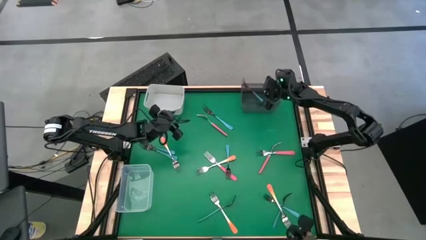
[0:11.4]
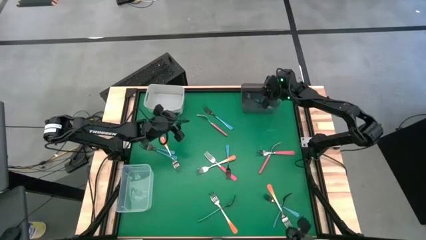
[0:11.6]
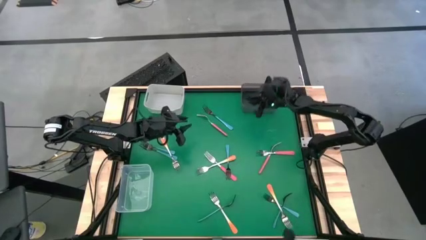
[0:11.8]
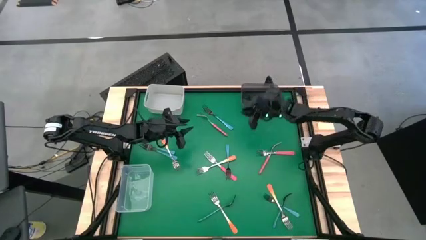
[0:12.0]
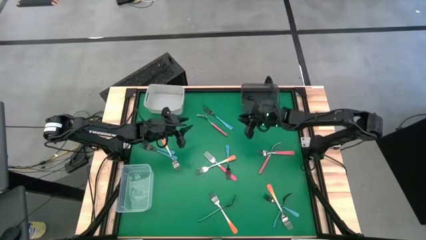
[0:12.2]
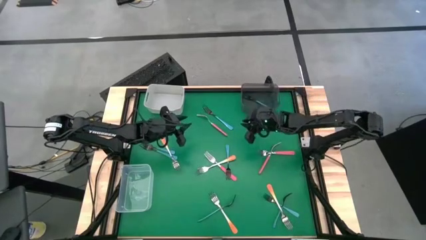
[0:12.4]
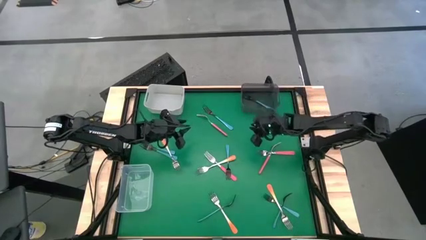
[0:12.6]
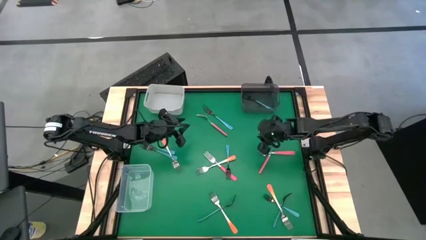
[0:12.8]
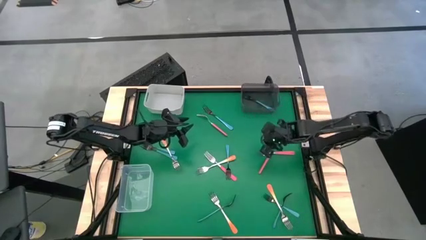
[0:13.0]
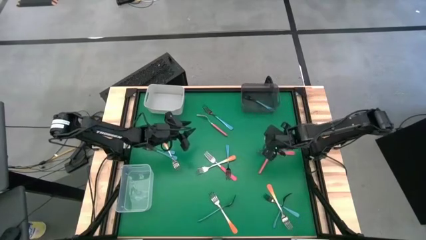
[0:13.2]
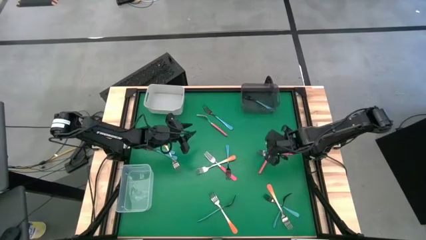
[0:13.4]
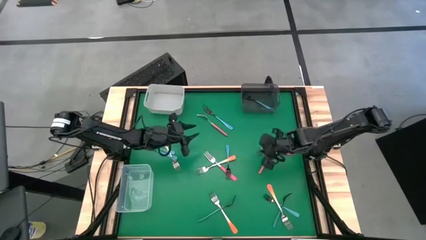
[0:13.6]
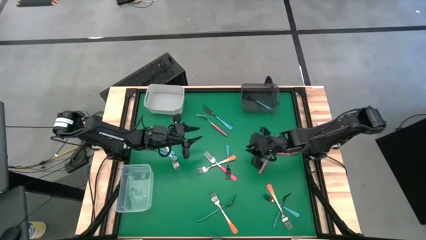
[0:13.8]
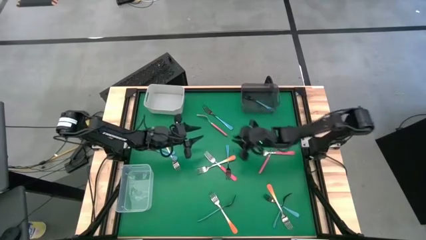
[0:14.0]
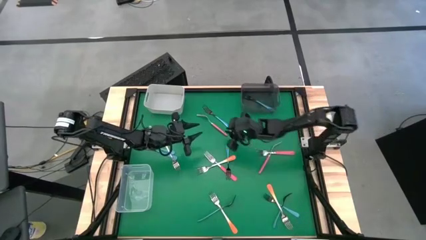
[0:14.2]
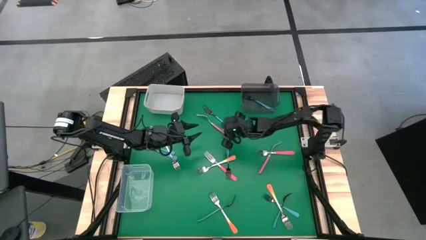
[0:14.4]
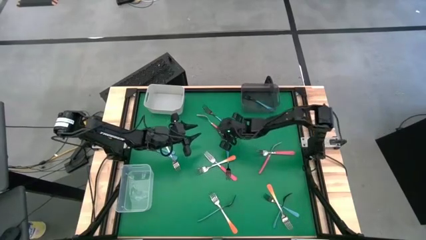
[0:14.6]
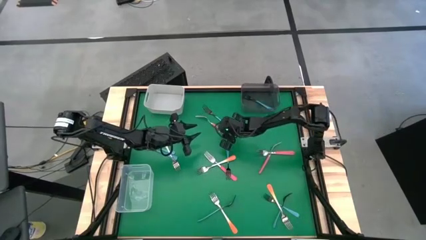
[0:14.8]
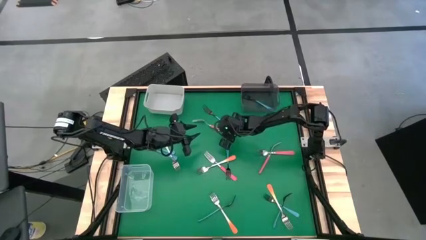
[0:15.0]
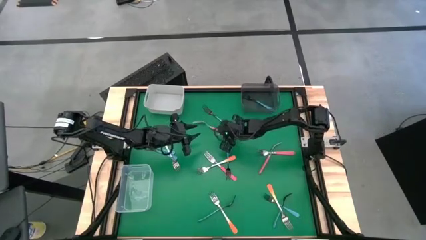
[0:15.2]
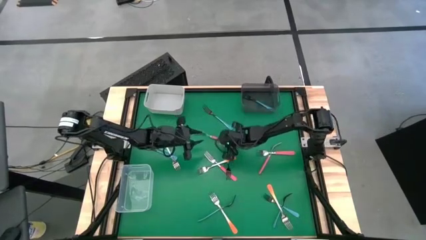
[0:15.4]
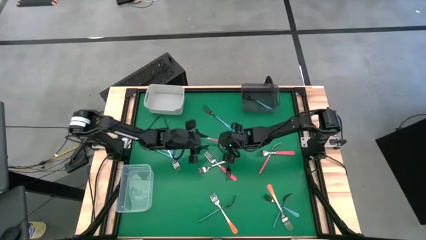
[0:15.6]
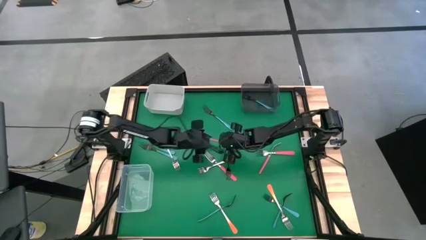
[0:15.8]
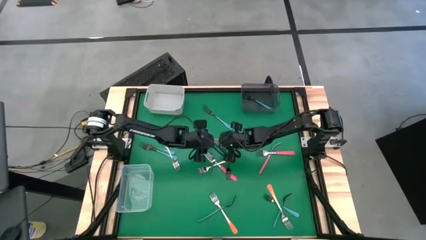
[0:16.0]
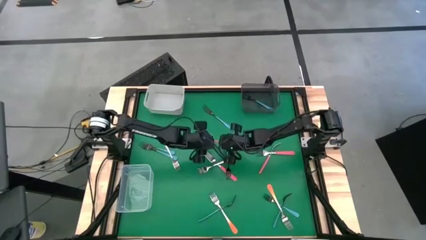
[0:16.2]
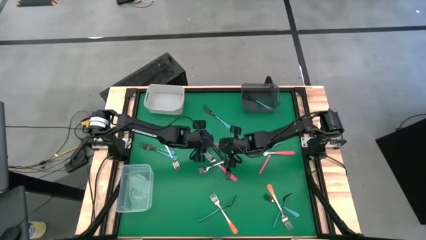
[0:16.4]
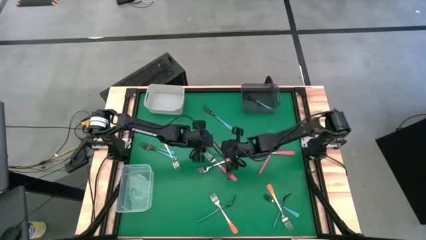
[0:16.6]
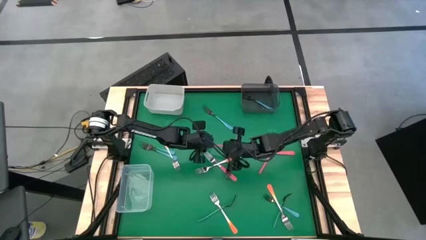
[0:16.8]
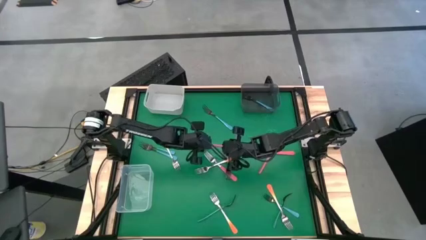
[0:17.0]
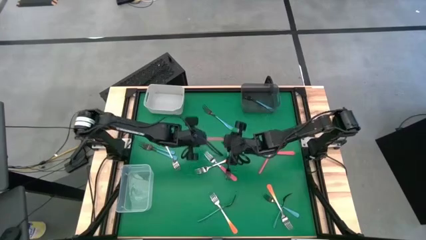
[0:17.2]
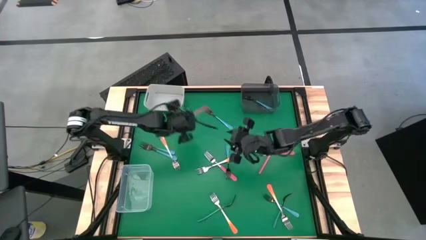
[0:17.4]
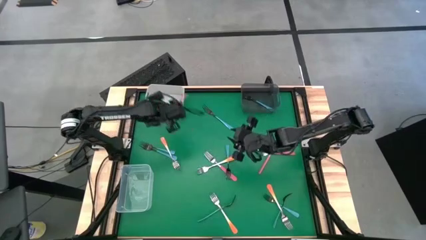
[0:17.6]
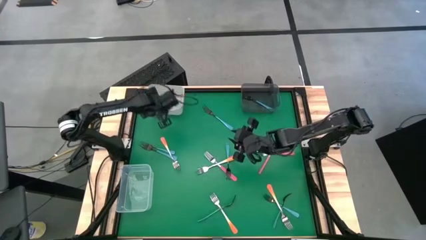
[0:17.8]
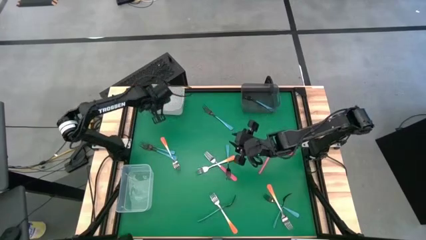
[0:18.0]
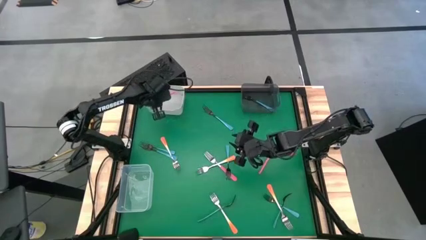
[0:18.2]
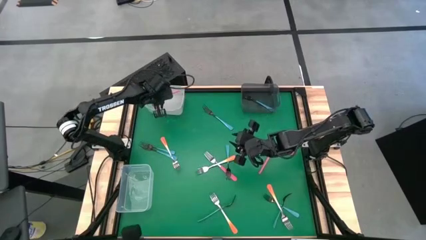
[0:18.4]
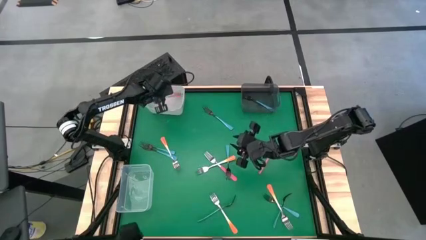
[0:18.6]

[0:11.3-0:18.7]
Task: Sort silverware by color (type)
Put the pink fork into the white bin

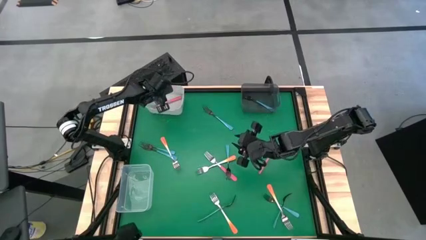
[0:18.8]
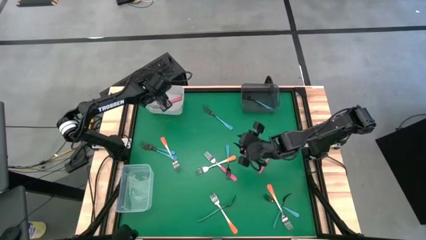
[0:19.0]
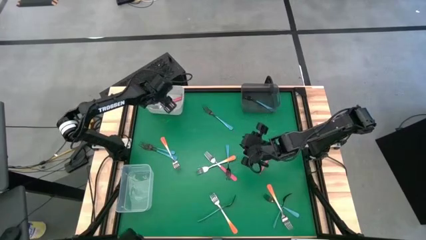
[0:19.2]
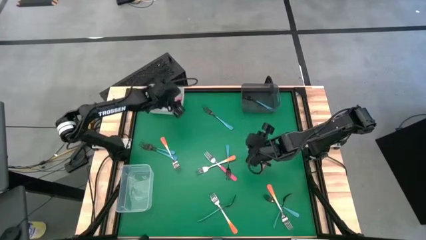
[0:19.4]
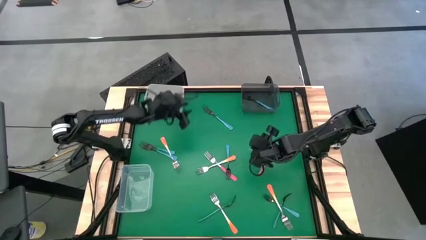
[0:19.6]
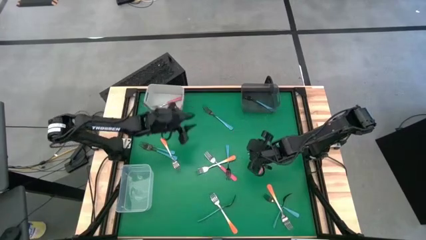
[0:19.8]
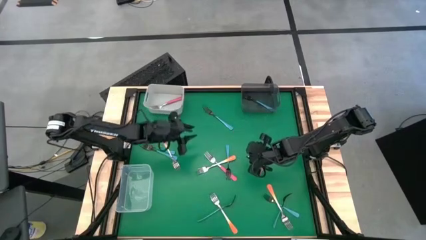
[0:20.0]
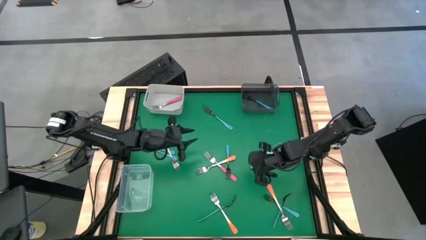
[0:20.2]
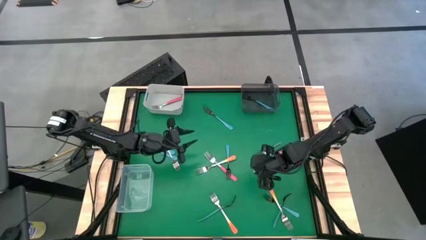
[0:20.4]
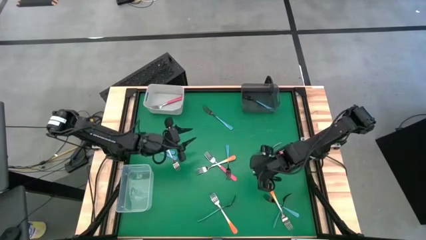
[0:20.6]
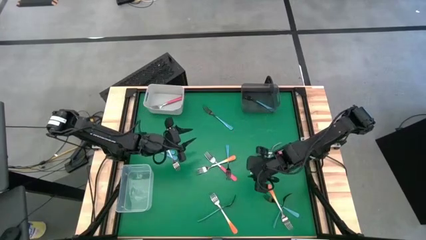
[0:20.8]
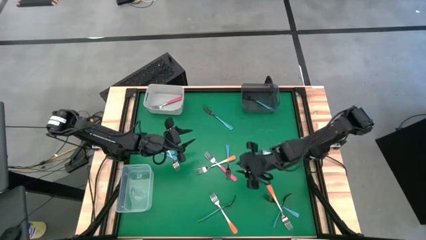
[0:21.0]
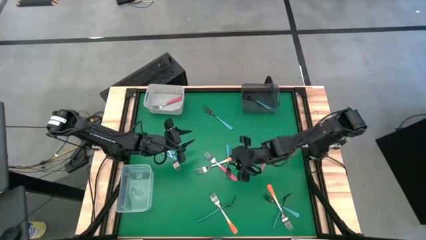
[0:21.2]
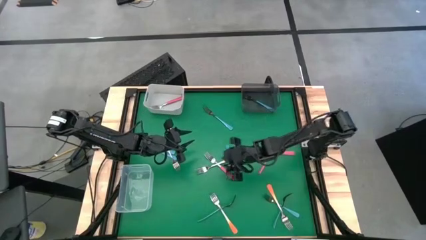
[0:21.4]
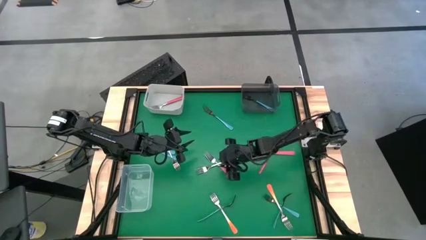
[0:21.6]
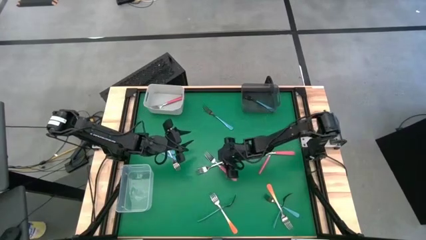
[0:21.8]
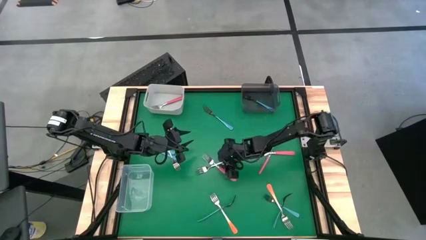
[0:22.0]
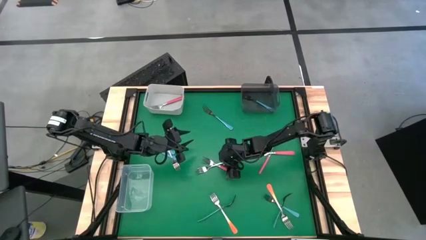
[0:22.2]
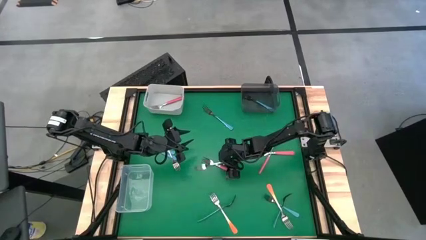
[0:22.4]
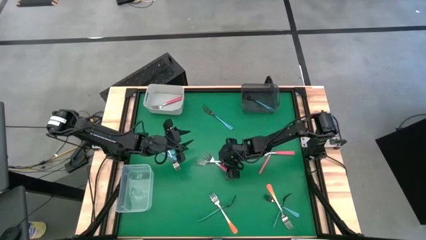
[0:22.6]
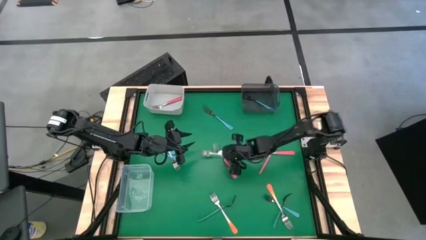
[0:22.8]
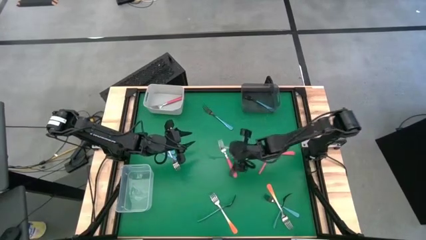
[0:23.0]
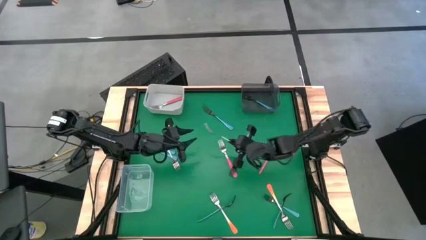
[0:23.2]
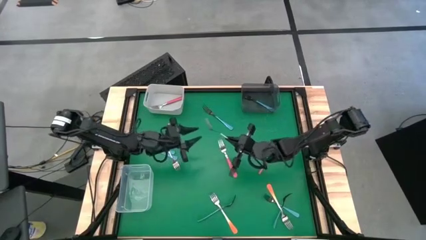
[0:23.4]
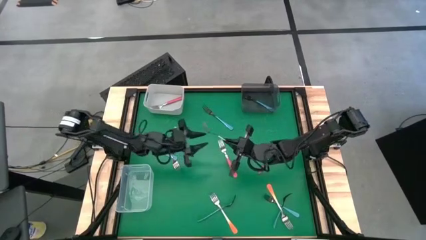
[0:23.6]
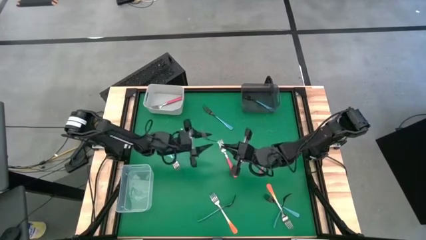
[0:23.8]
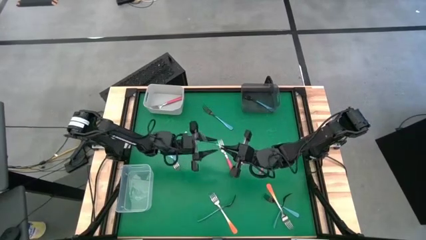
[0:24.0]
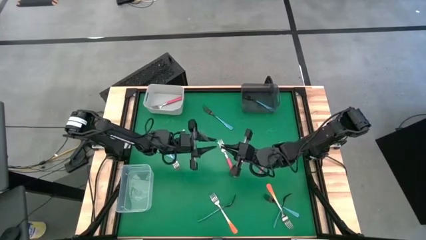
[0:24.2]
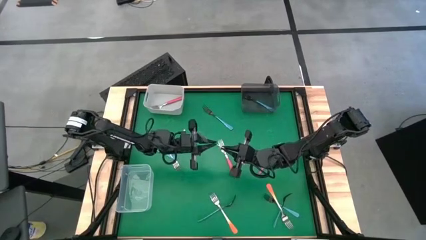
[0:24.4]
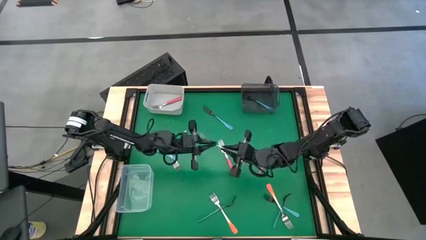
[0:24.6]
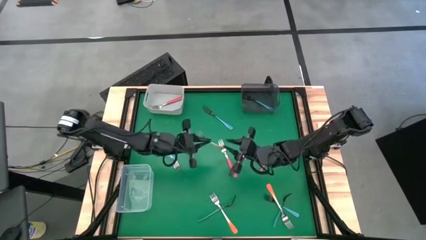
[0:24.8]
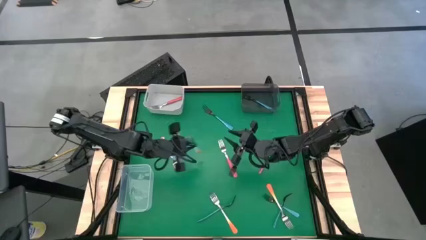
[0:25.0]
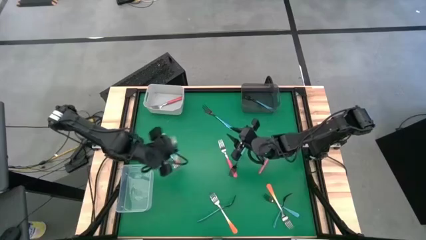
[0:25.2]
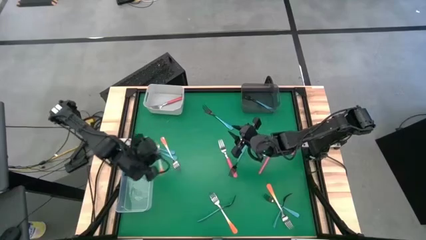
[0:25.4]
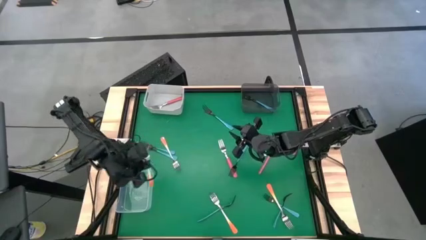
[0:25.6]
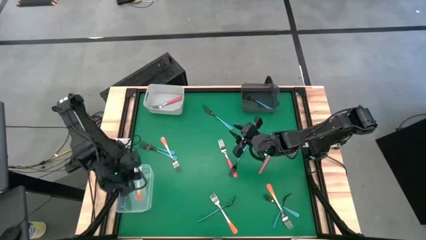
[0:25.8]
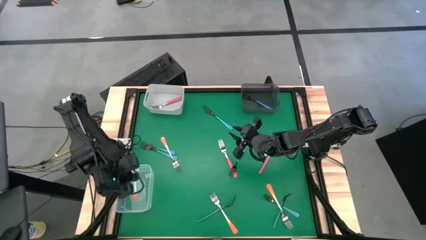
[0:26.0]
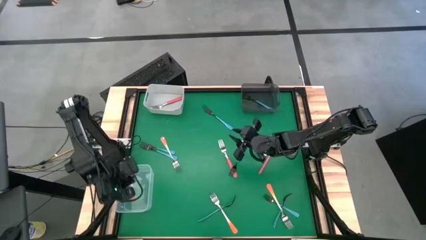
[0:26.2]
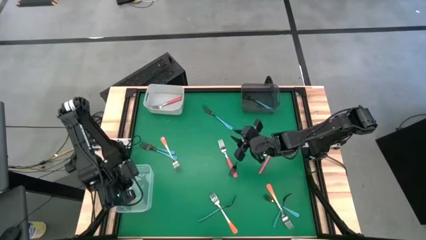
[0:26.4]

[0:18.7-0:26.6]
Put the orange fork into the transparent bin

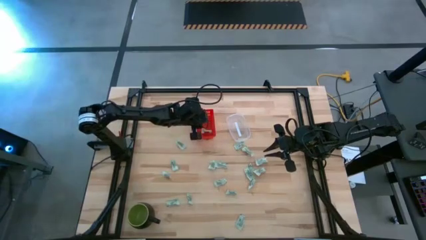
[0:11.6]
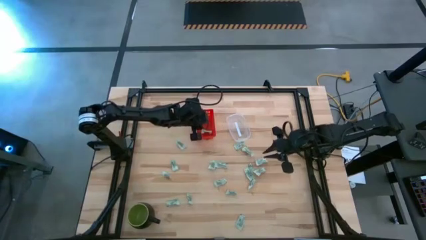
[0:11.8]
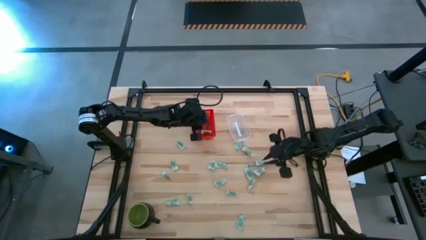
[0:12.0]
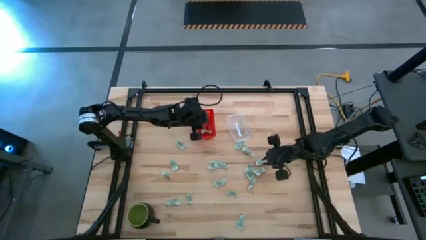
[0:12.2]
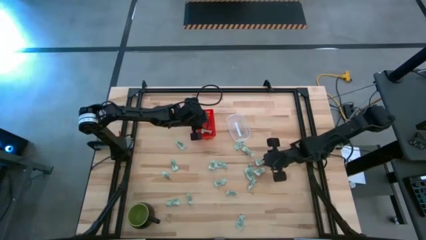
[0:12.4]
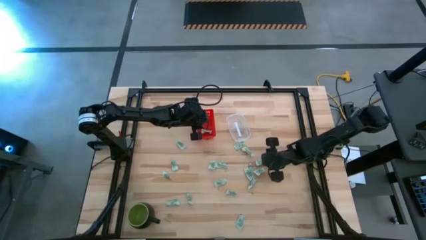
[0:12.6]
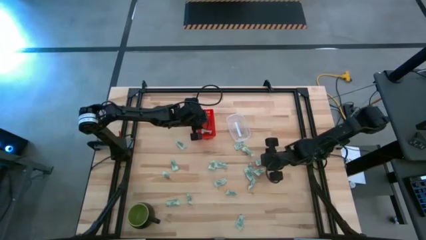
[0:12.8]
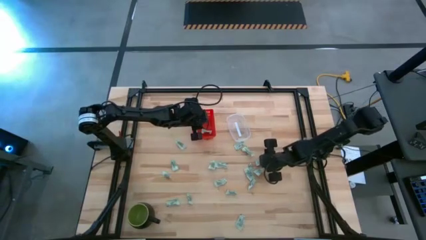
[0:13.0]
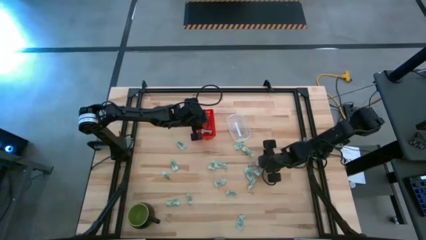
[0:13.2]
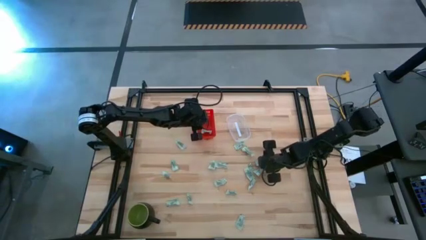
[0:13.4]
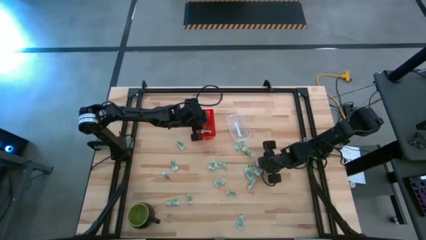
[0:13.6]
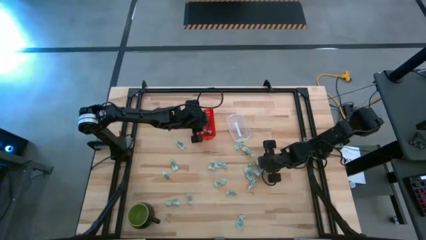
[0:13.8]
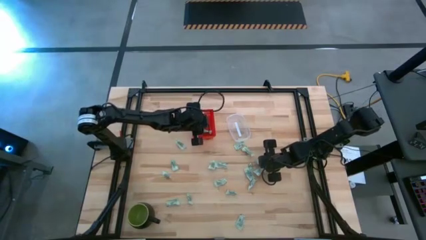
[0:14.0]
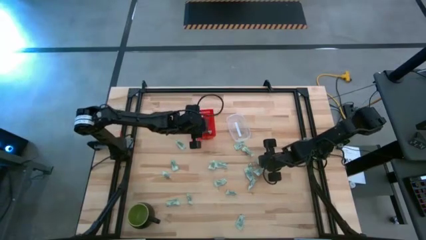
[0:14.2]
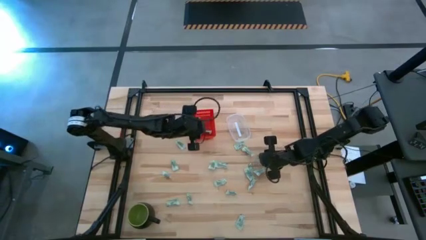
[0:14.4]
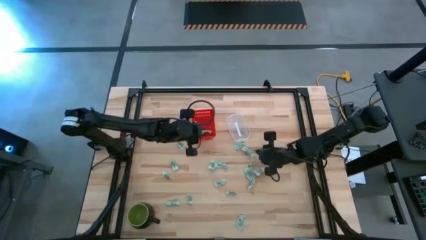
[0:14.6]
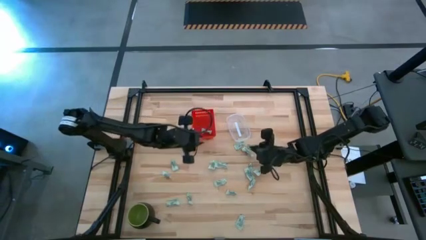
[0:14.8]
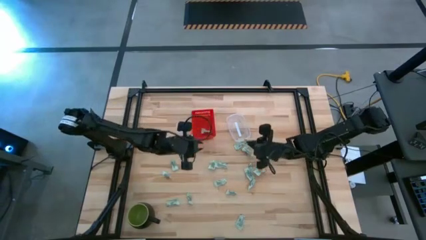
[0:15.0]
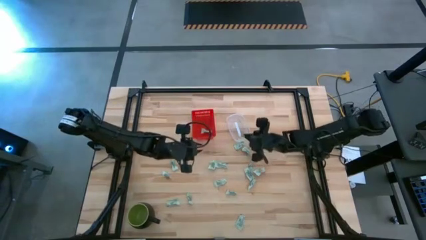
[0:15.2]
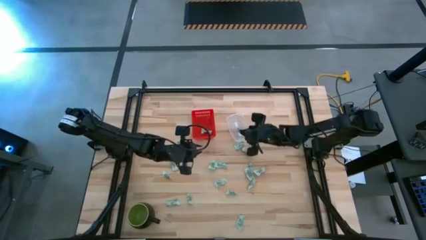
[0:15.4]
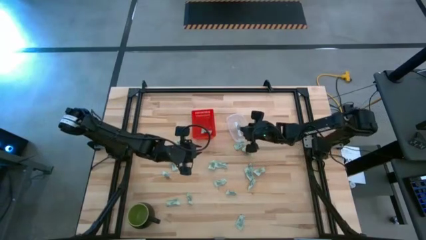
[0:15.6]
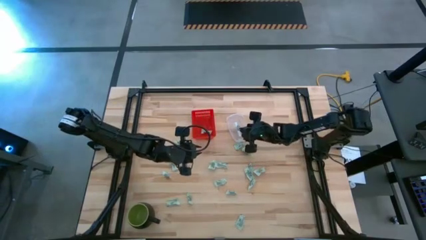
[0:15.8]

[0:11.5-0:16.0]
Task: Pick and place items into bin
Put the white stevia packet into the transparent bin
